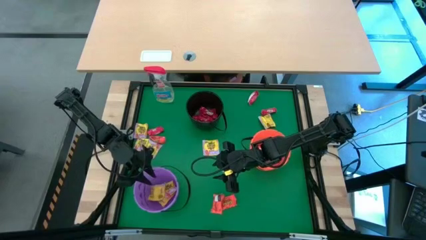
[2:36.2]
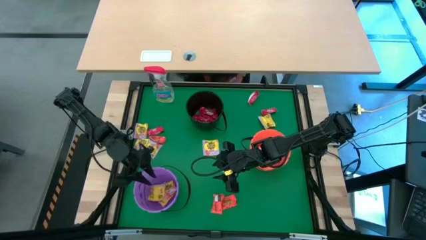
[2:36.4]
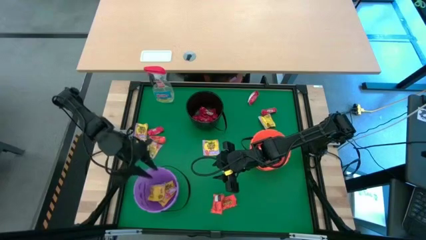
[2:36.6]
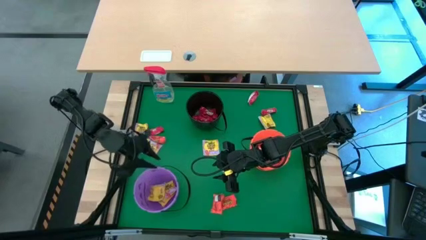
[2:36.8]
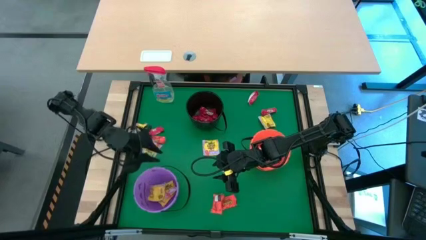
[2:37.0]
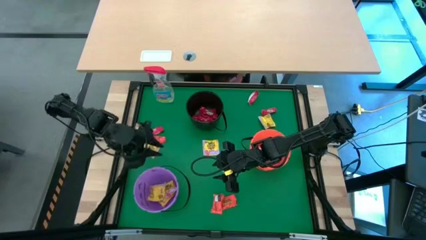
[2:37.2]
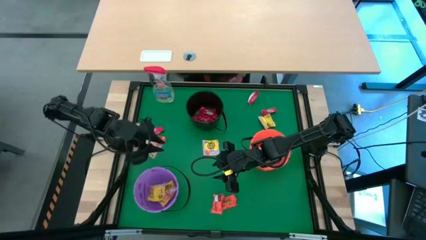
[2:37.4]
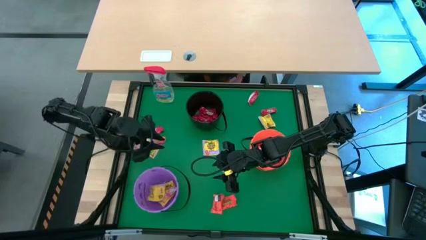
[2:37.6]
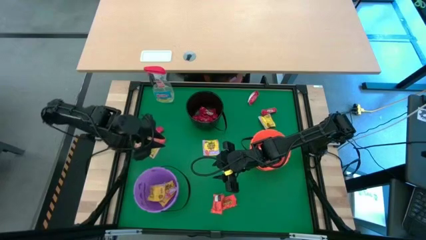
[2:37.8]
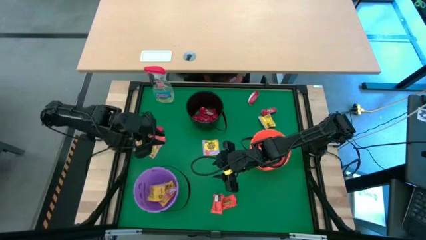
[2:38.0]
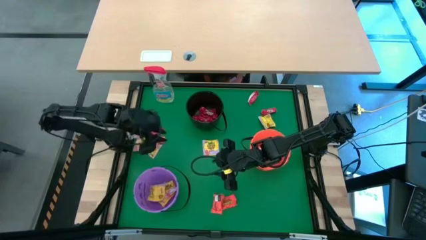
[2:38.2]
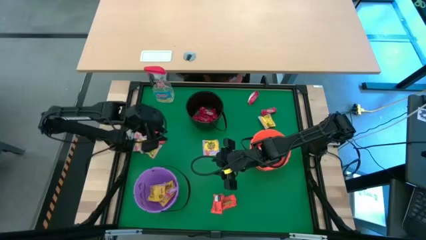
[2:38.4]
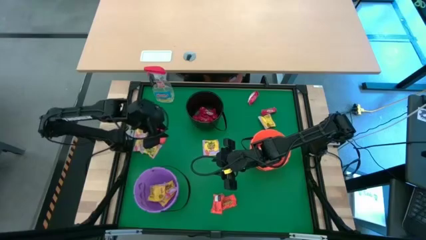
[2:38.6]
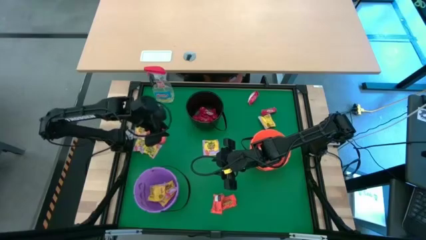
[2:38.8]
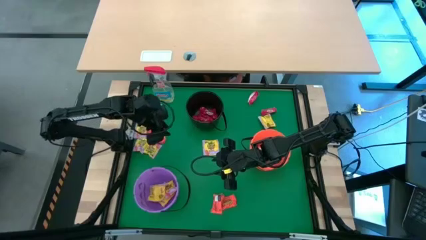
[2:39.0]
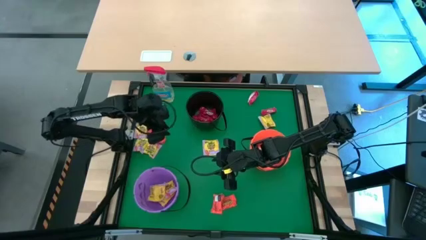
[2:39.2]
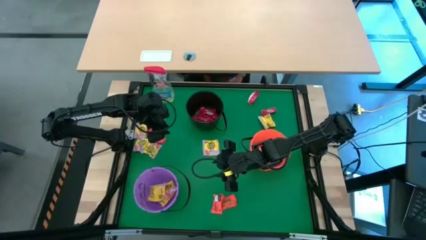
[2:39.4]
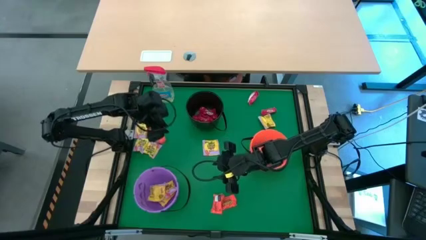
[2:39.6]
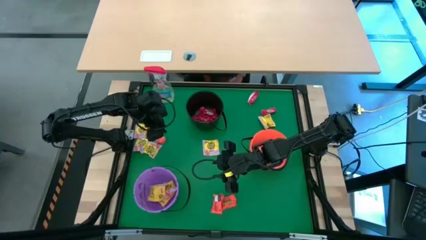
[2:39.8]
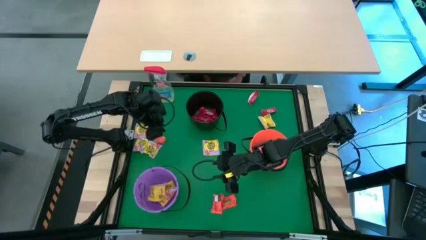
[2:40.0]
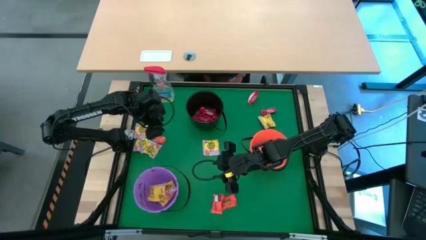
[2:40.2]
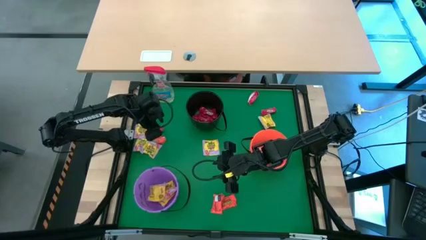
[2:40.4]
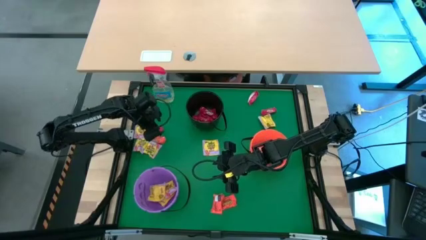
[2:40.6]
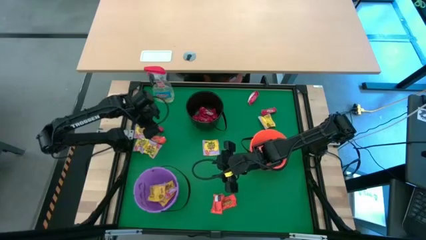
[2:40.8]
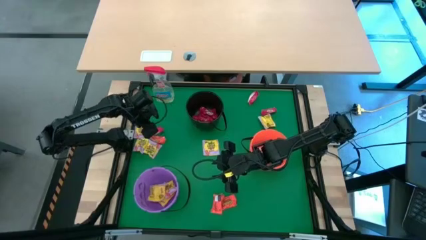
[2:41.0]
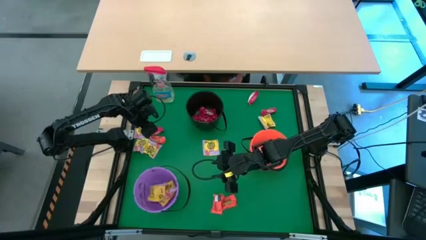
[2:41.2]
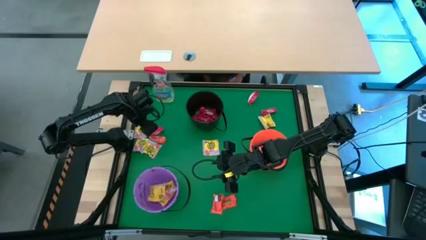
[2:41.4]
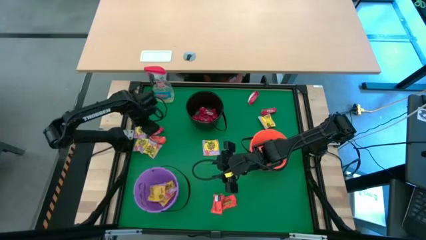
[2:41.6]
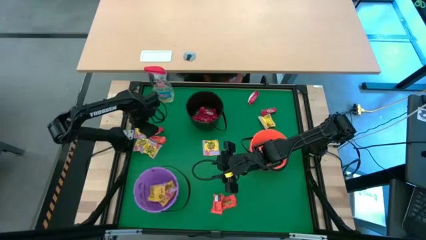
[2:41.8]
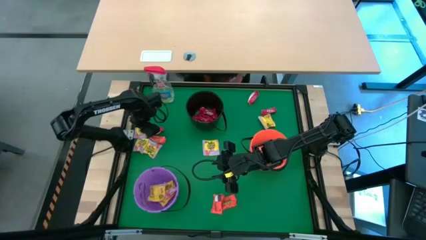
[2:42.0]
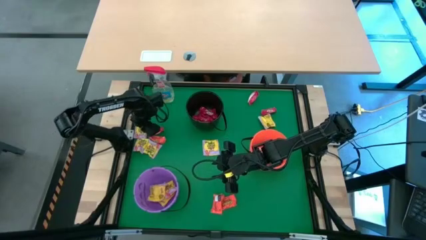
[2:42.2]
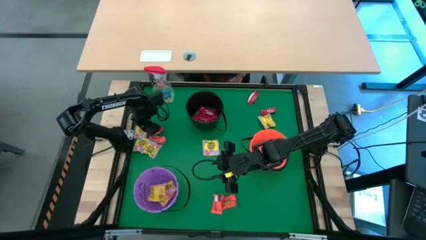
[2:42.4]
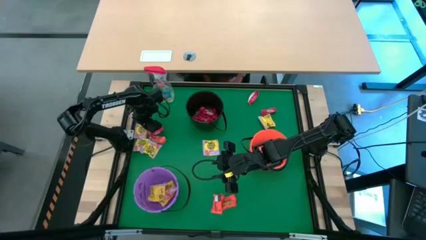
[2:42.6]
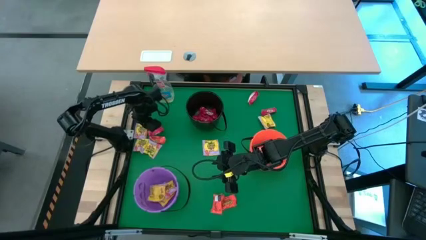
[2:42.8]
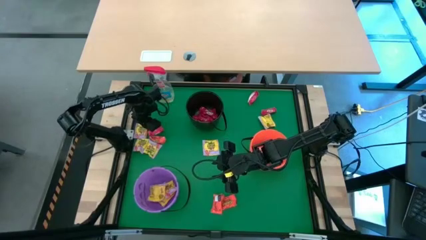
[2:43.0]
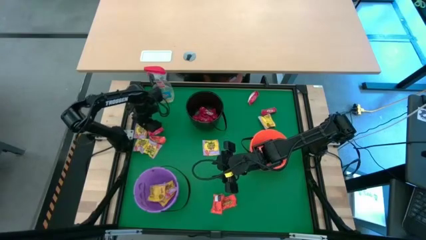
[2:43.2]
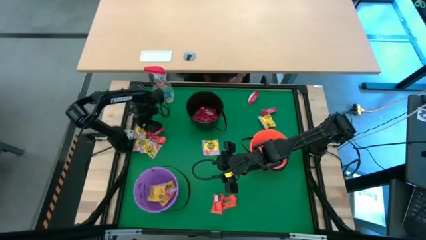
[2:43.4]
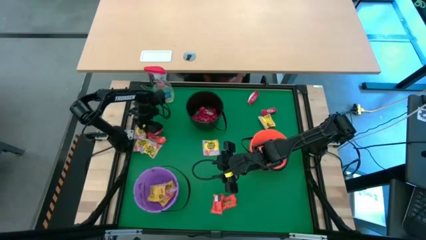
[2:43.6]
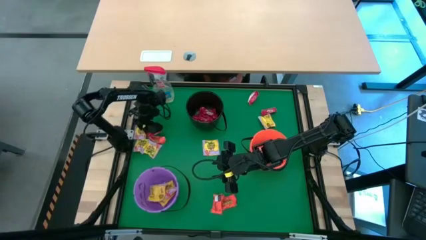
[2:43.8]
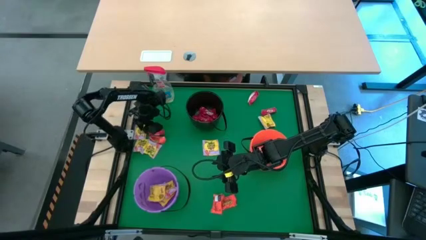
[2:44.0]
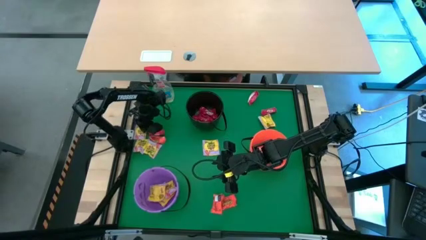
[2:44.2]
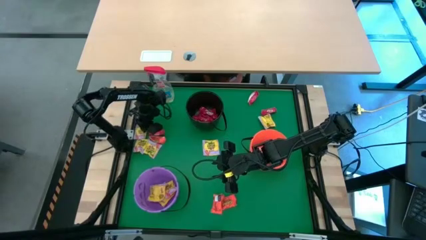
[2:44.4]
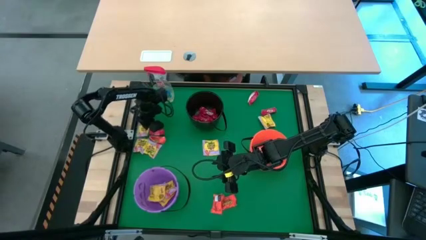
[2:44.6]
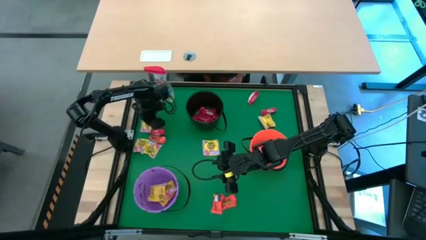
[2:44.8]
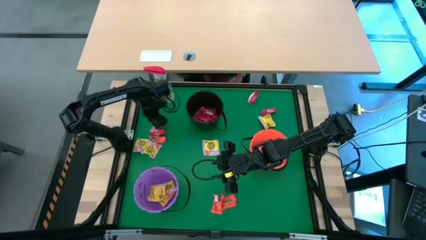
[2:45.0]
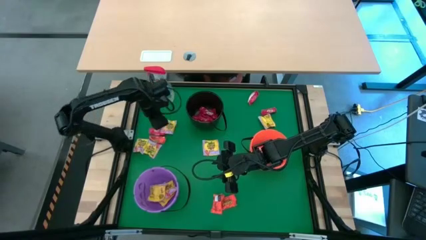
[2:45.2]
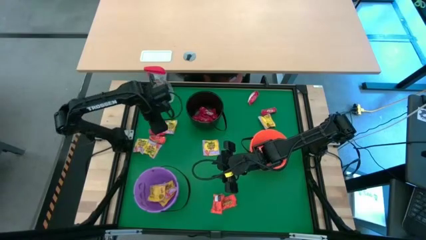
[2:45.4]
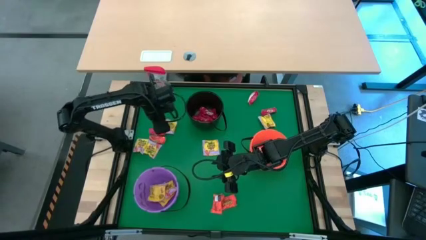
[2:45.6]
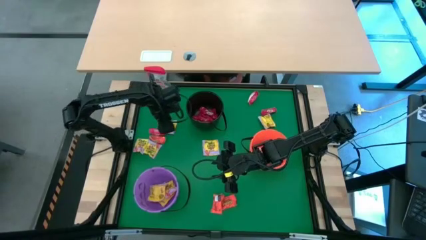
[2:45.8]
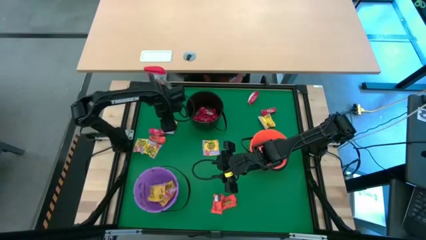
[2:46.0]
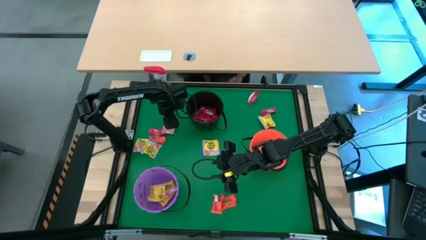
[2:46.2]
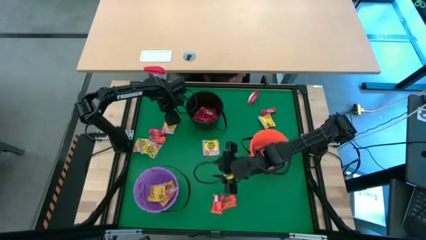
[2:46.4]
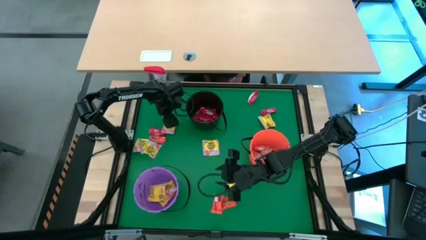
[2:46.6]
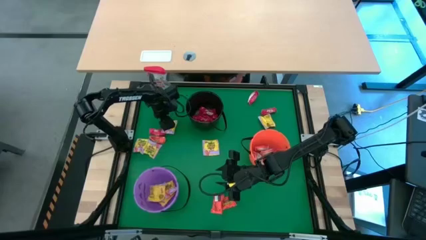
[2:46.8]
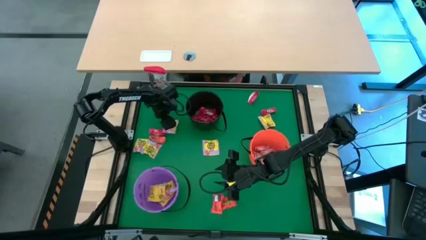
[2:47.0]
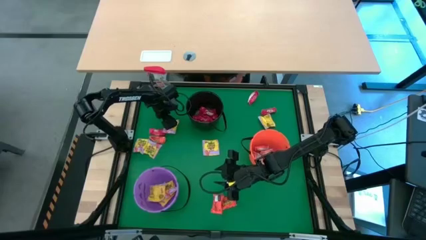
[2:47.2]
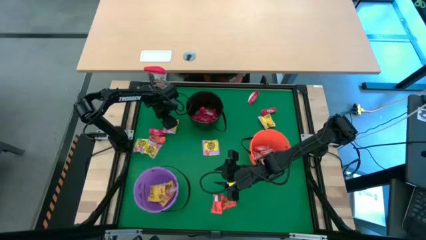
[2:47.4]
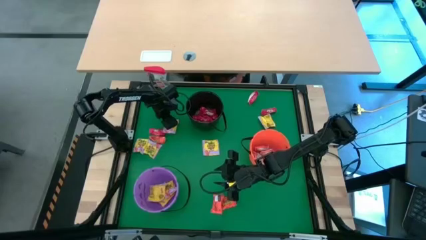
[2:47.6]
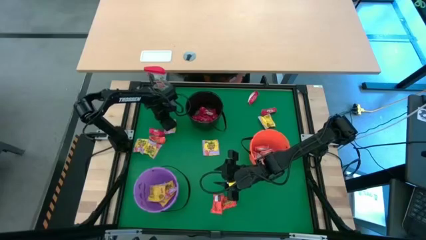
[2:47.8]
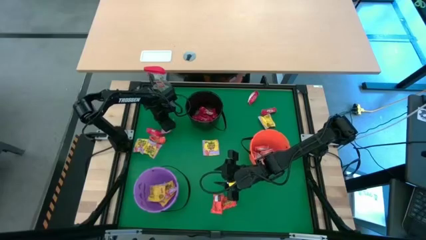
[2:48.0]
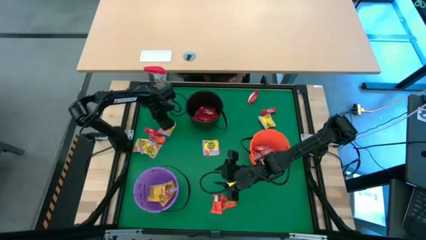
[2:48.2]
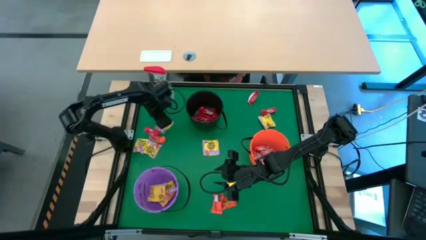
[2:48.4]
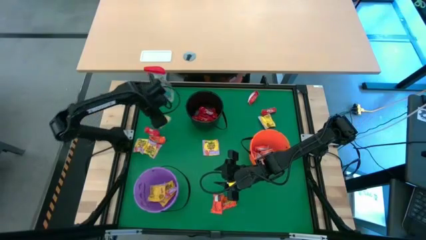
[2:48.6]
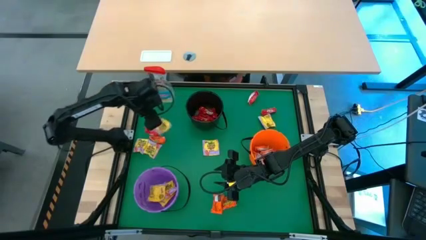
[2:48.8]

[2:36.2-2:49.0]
Task: Sort candy
Put the yellow candy into the violet bucket

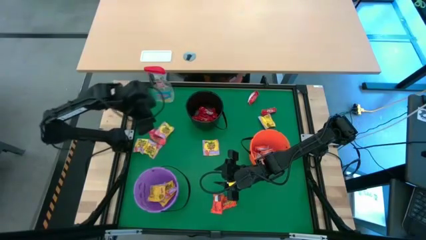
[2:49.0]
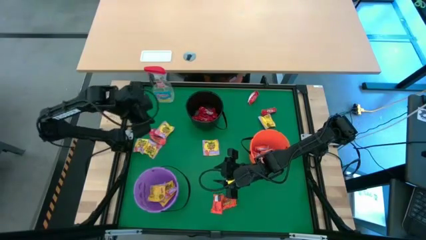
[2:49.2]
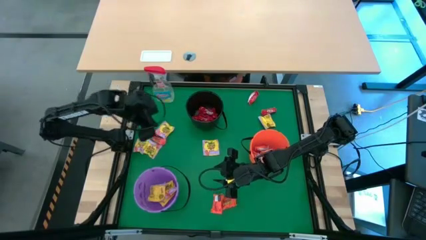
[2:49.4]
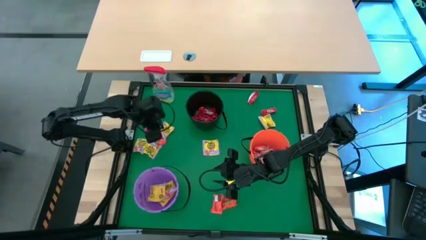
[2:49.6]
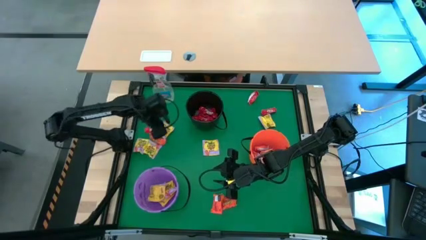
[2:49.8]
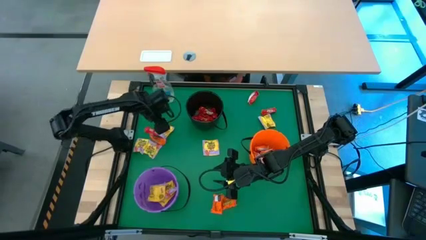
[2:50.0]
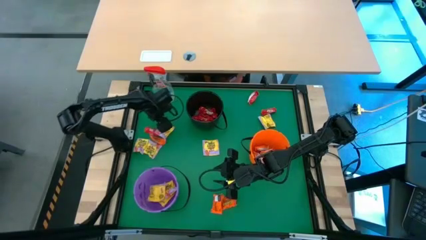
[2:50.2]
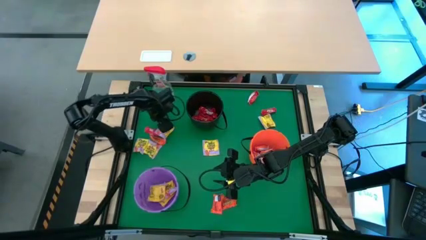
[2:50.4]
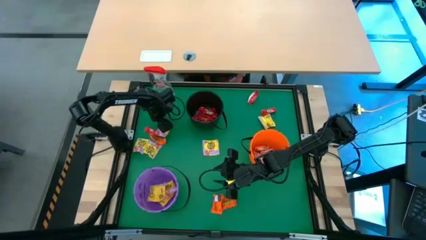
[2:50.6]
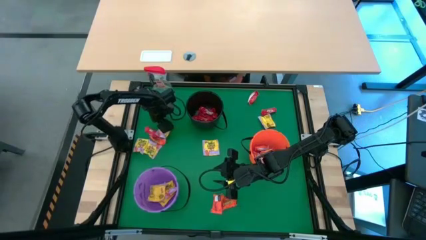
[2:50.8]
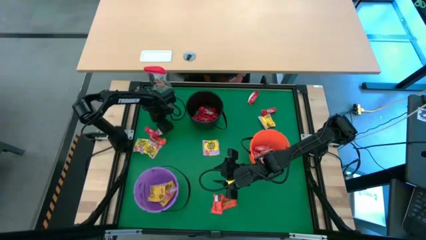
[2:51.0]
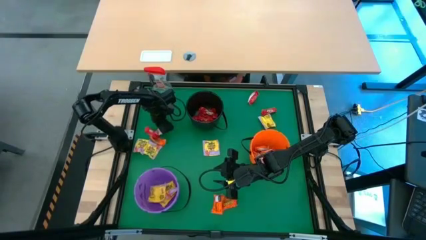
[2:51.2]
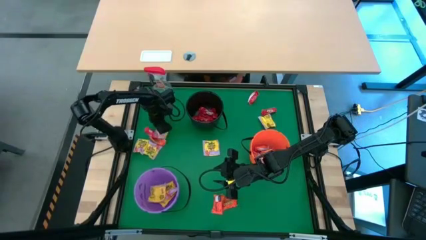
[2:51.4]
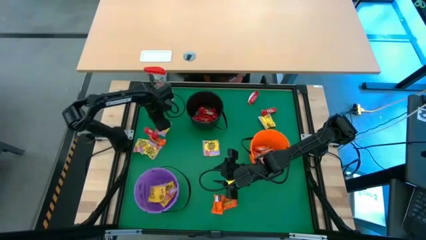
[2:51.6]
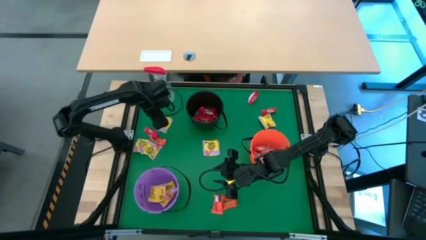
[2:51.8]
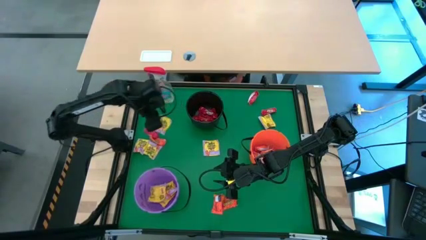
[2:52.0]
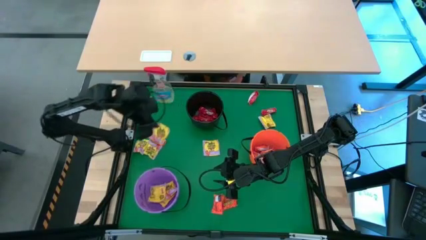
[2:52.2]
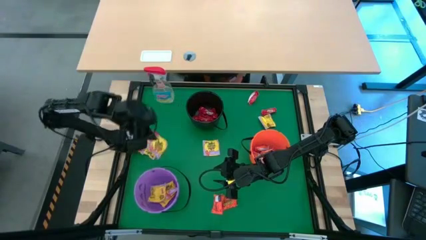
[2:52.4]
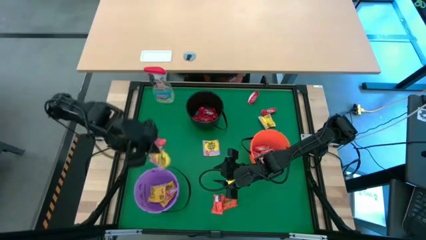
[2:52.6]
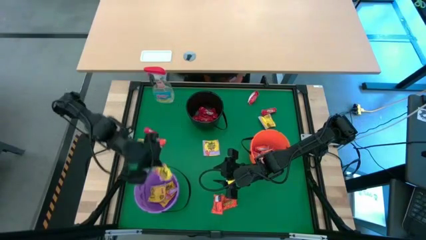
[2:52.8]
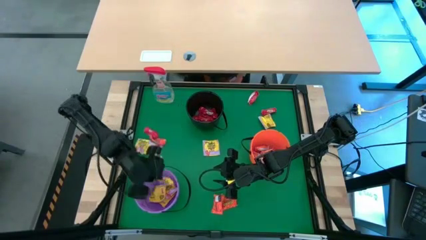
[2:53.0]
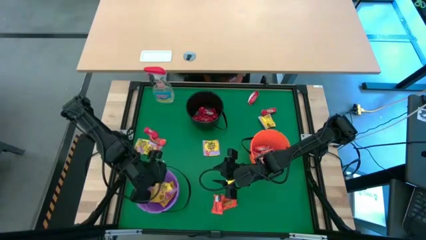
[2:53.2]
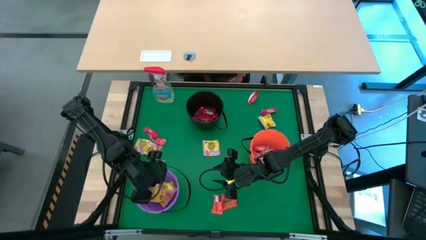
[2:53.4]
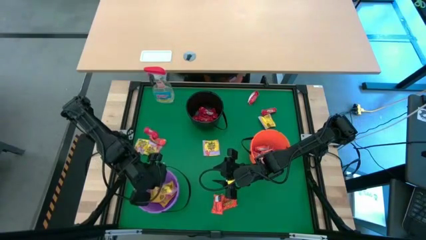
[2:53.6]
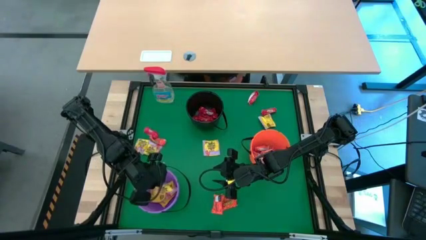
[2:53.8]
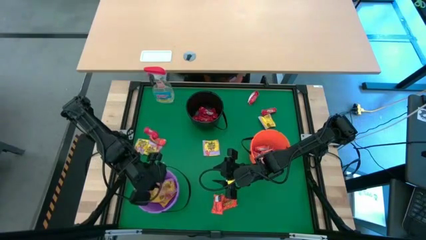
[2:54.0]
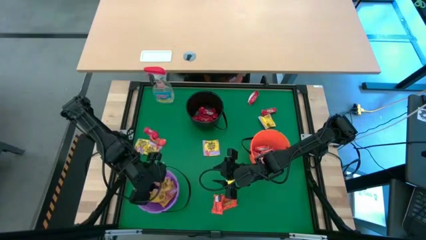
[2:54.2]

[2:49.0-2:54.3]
Put the yellow candy into the violet bucket
